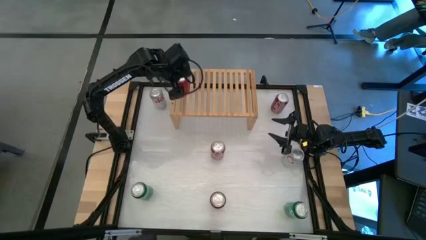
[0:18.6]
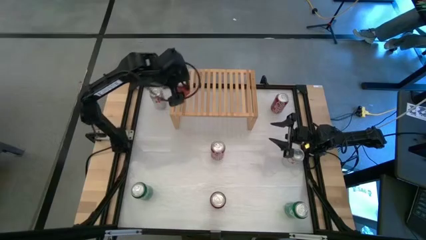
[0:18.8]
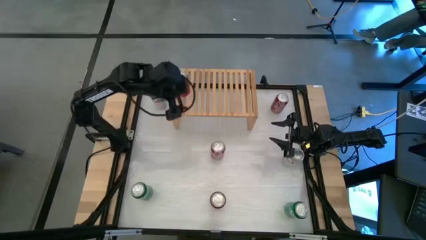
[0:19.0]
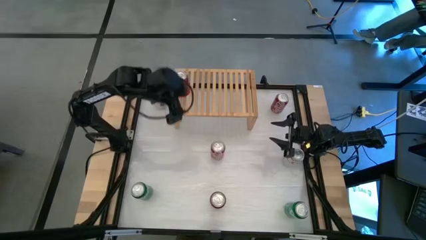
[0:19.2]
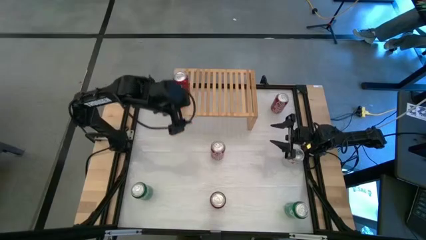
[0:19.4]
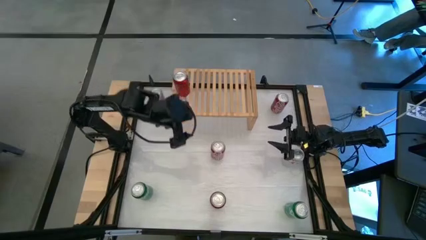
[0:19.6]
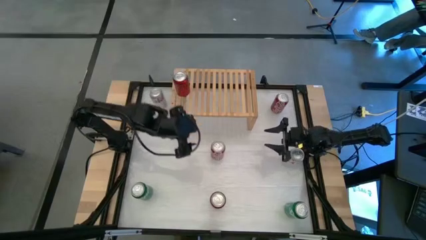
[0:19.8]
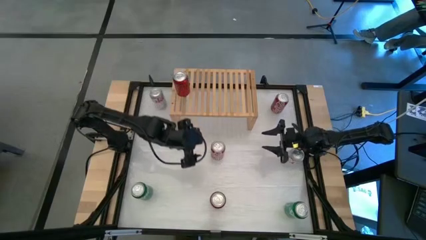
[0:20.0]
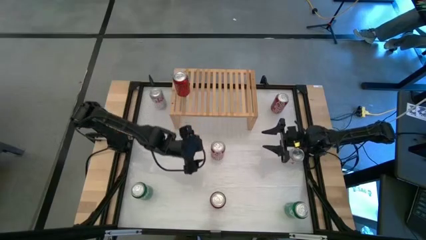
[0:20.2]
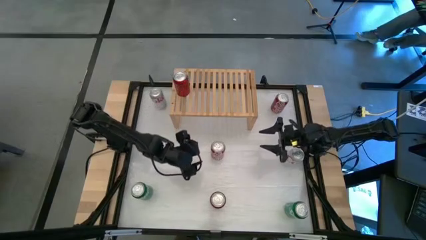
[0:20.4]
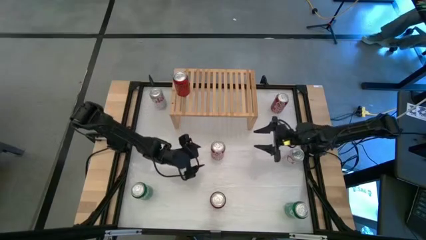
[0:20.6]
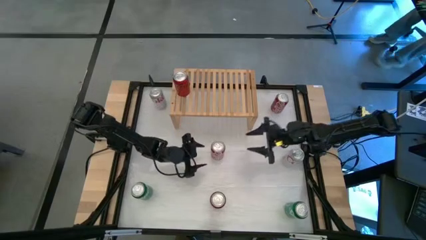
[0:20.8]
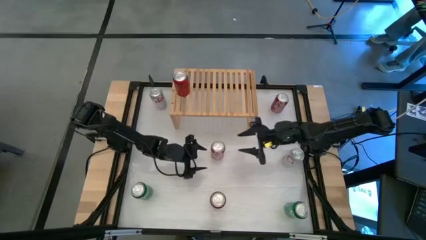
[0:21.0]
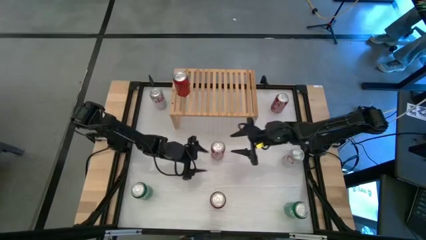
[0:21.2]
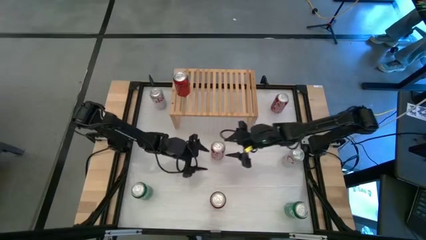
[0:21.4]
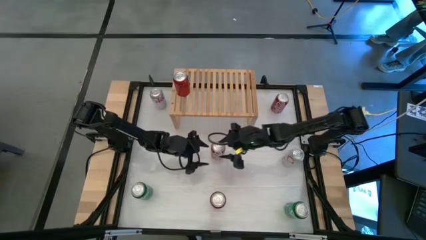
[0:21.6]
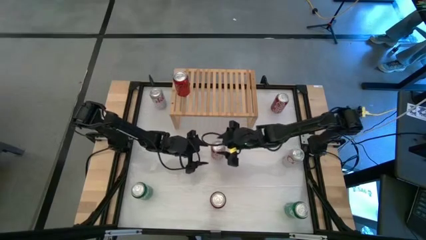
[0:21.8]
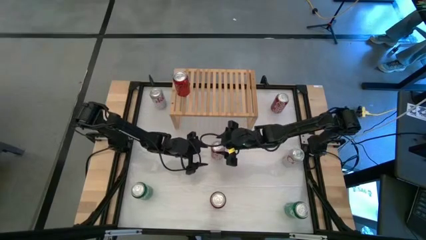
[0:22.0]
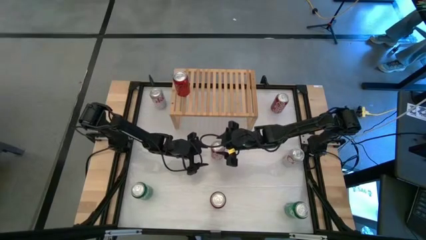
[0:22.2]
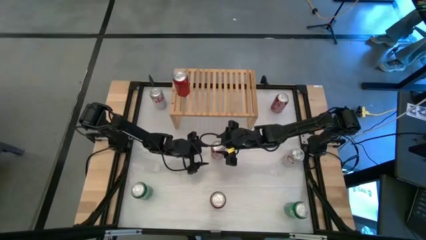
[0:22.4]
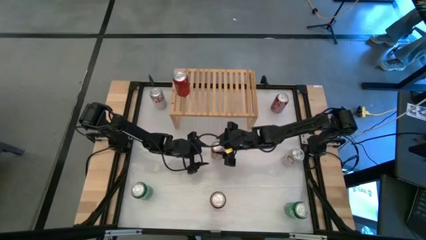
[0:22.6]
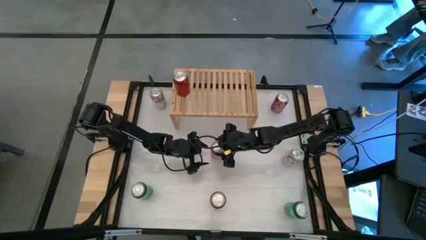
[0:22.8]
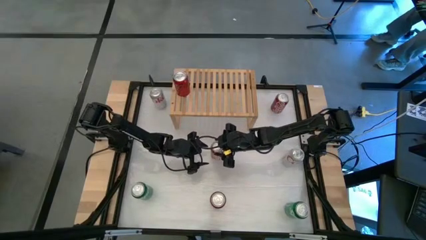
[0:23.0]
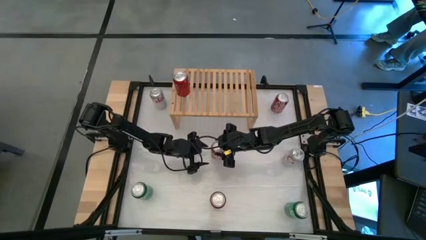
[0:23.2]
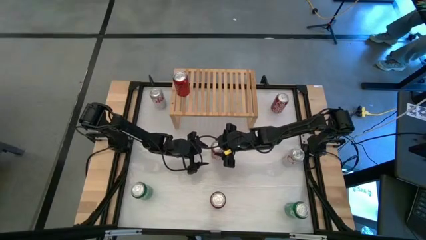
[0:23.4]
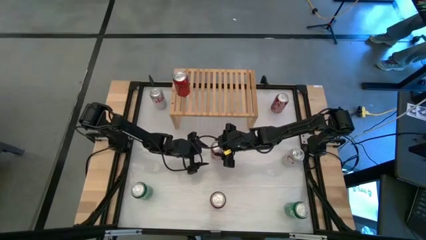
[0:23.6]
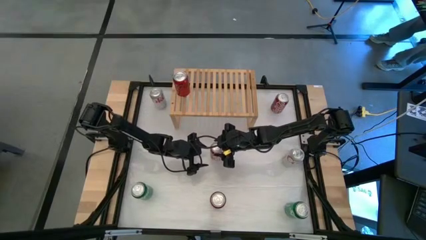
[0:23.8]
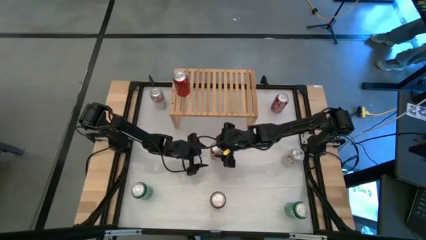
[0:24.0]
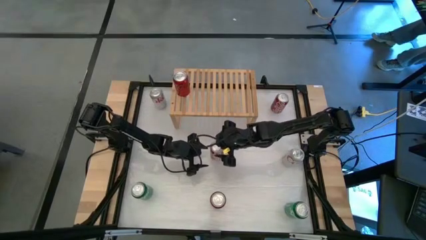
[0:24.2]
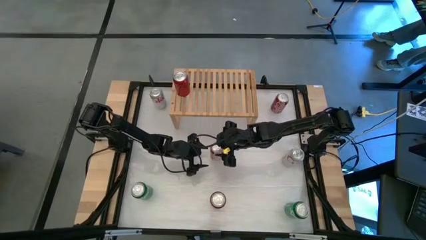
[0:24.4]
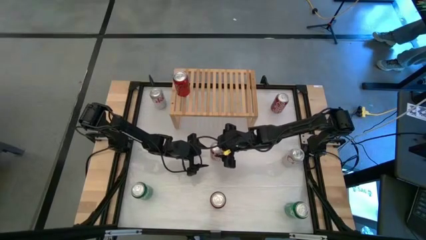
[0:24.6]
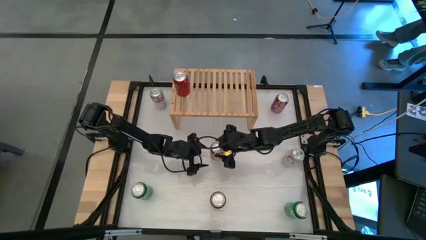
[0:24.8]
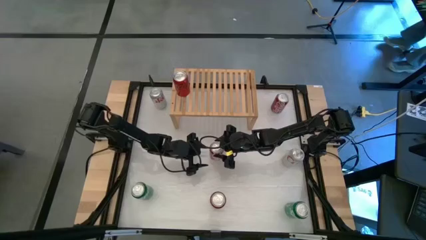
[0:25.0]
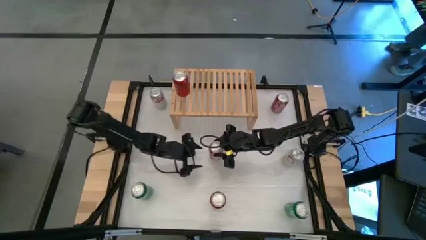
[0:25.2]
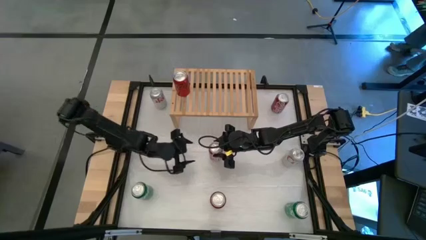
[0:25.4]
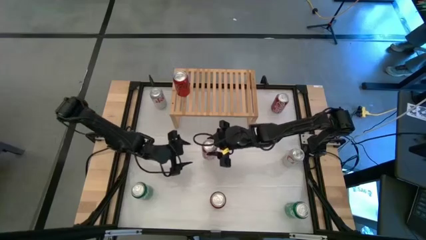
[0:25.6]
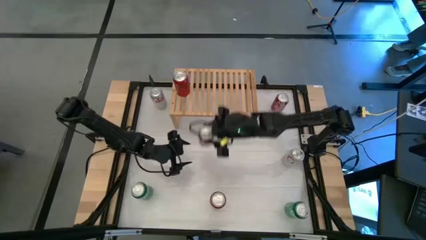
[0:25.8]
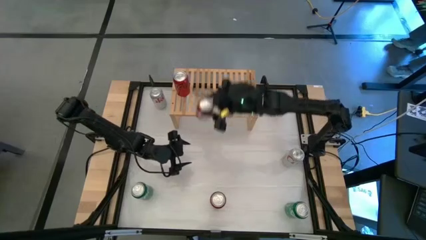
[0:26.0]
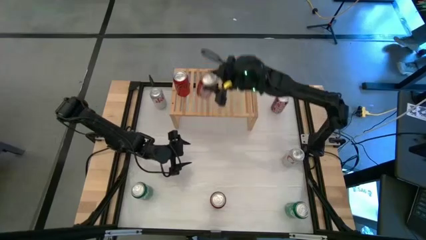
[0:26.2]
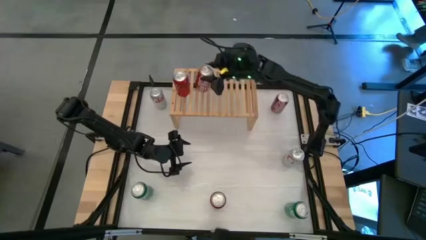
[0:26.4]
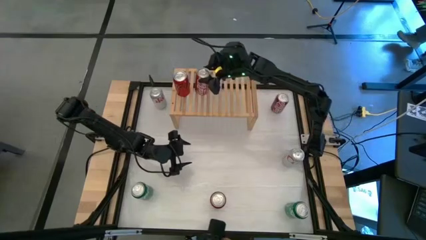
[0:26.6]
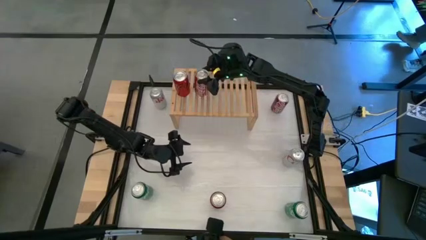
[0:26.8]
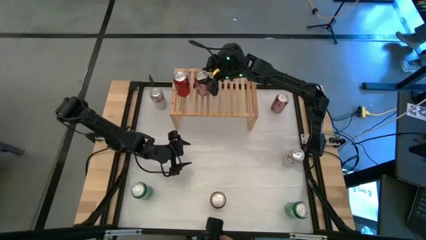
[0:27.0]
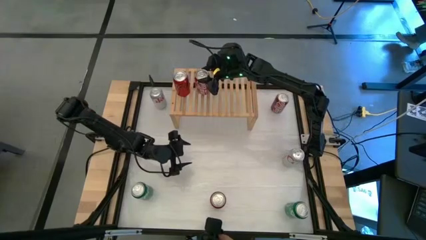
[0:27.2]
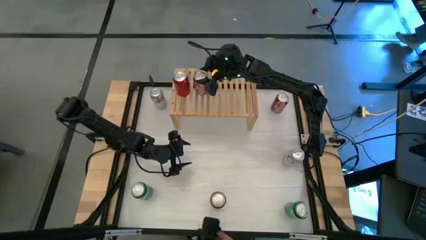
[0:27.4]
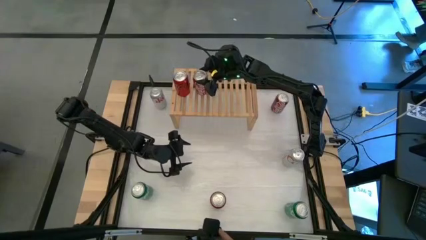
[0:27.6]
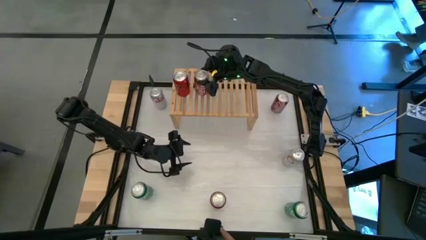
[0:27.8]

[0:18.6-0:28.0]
Task: Place canned beverage on shelf
Put the bottom red and white soda can on the shelf
